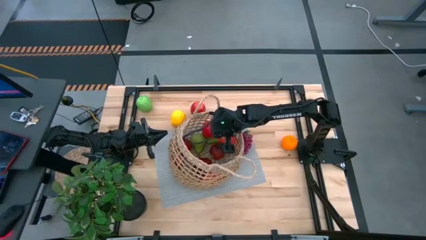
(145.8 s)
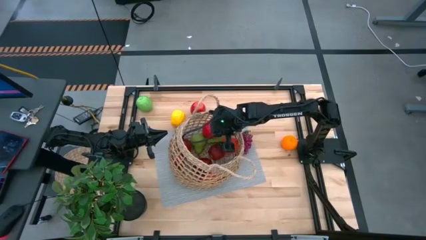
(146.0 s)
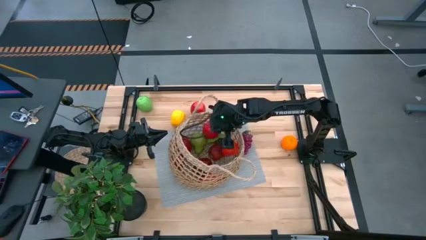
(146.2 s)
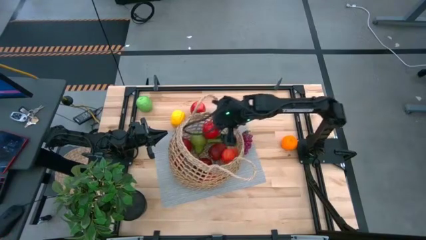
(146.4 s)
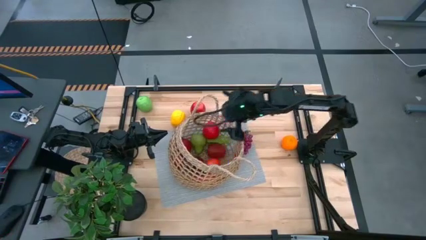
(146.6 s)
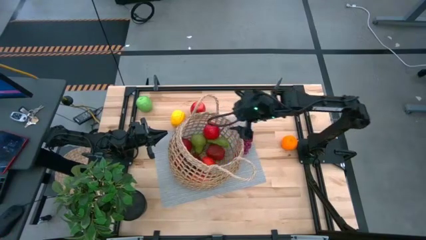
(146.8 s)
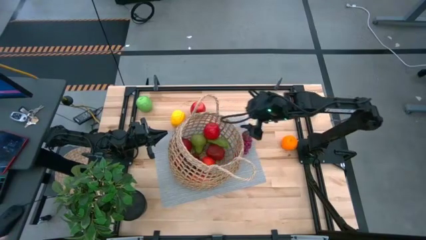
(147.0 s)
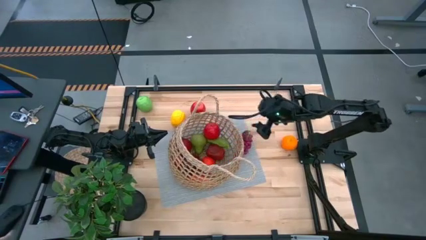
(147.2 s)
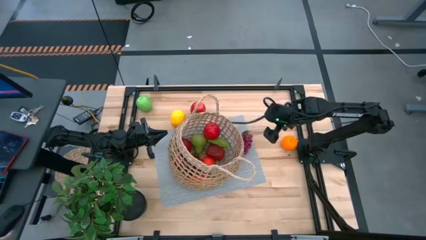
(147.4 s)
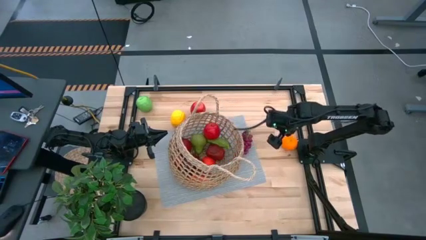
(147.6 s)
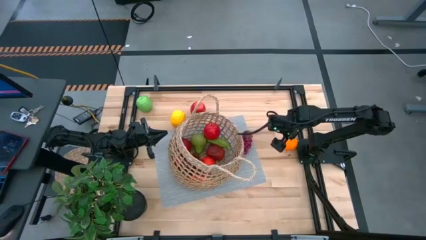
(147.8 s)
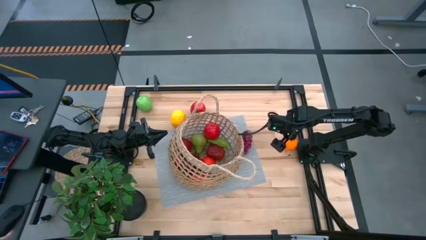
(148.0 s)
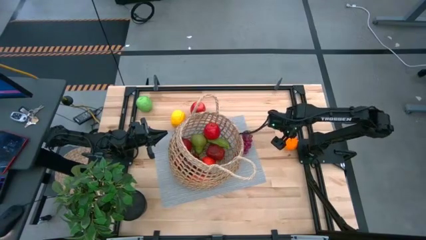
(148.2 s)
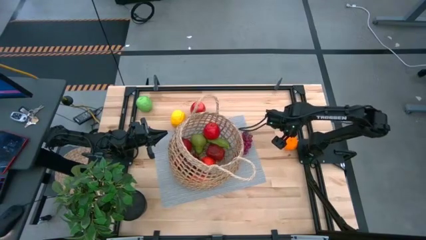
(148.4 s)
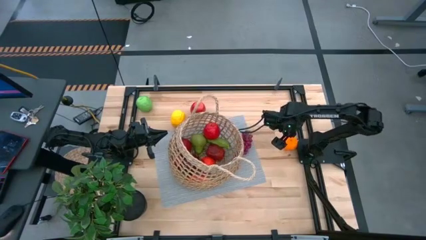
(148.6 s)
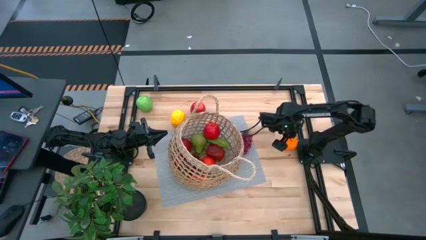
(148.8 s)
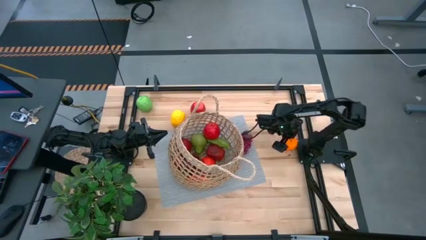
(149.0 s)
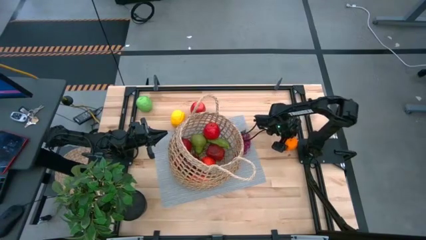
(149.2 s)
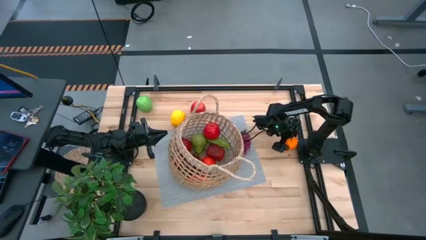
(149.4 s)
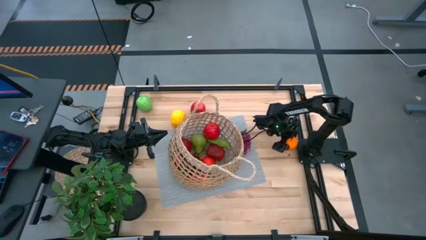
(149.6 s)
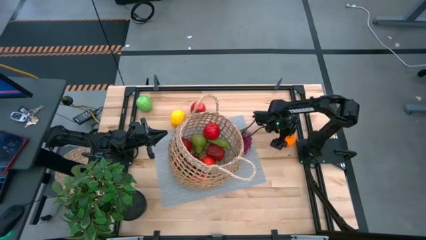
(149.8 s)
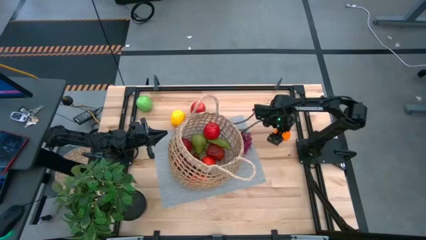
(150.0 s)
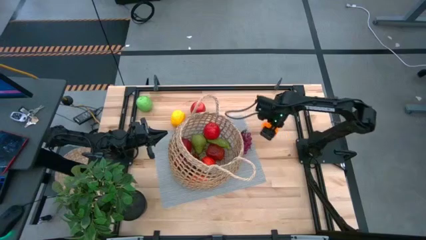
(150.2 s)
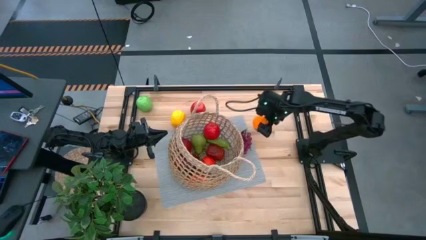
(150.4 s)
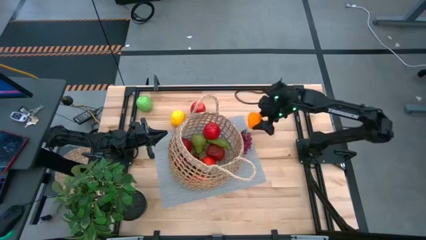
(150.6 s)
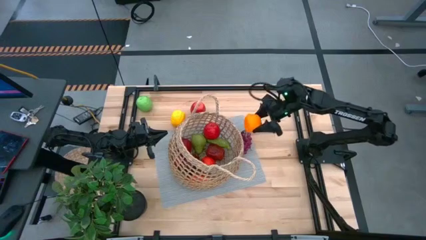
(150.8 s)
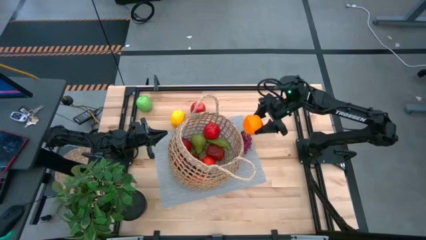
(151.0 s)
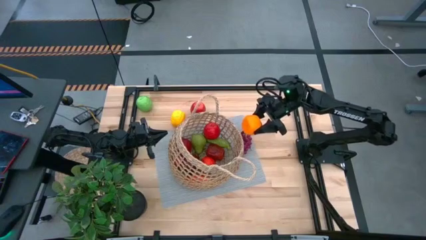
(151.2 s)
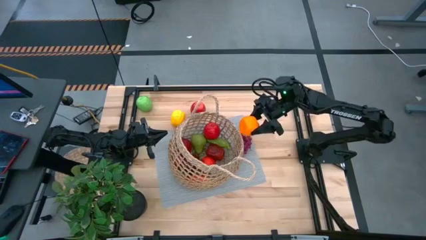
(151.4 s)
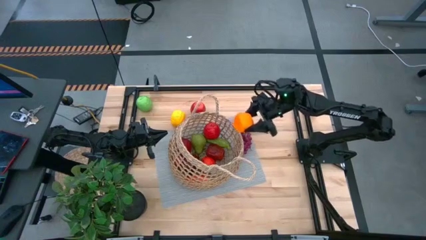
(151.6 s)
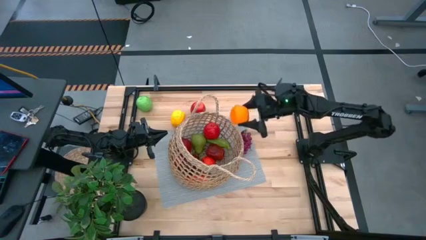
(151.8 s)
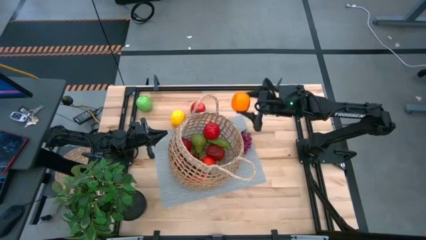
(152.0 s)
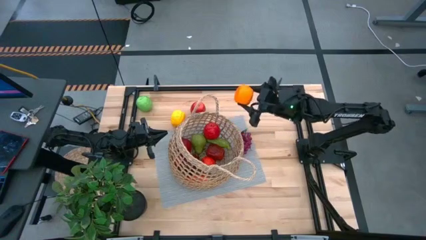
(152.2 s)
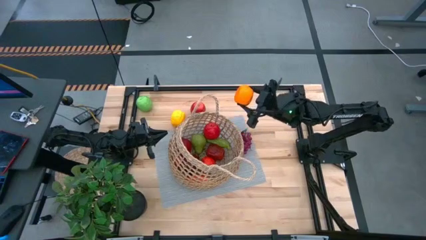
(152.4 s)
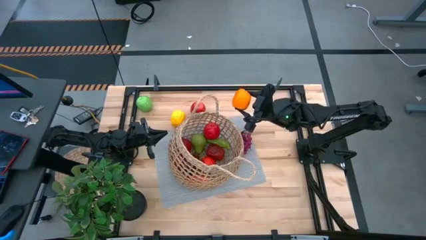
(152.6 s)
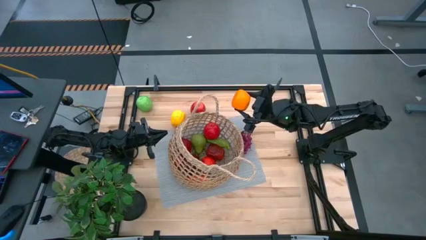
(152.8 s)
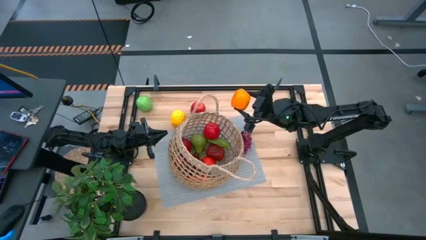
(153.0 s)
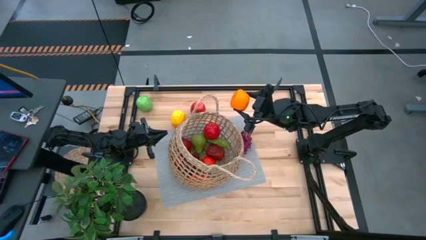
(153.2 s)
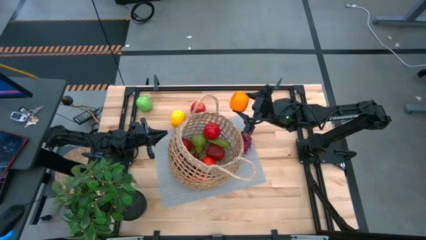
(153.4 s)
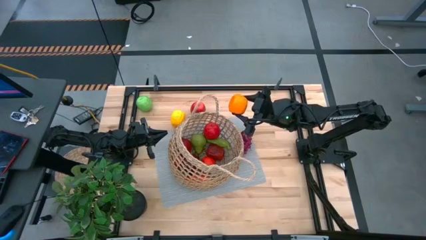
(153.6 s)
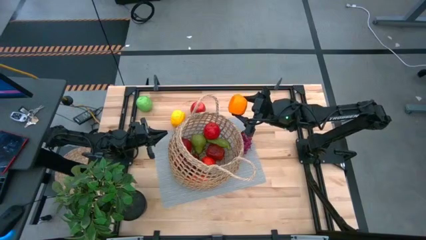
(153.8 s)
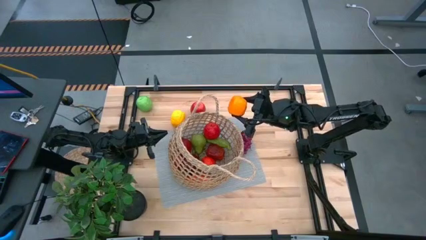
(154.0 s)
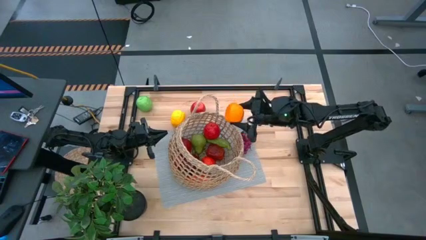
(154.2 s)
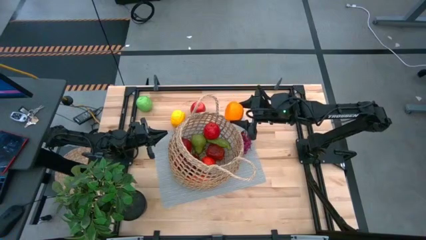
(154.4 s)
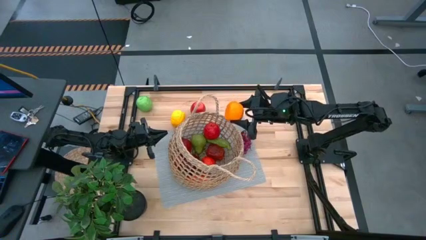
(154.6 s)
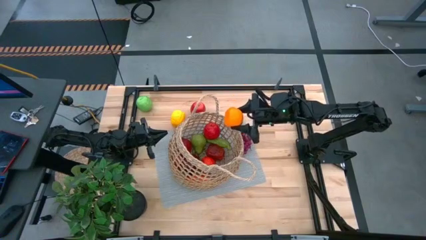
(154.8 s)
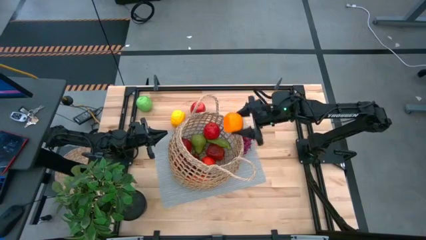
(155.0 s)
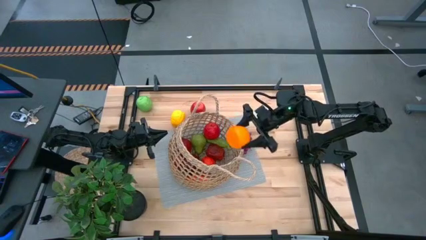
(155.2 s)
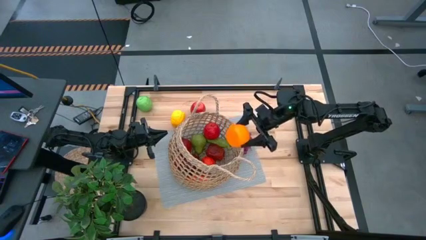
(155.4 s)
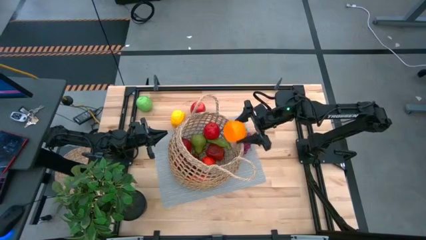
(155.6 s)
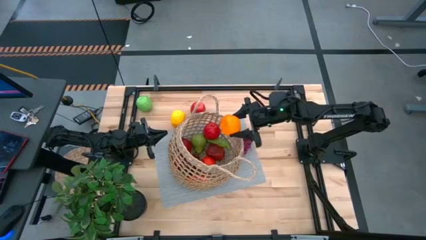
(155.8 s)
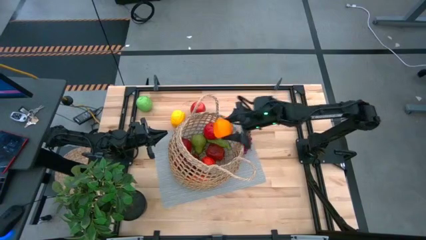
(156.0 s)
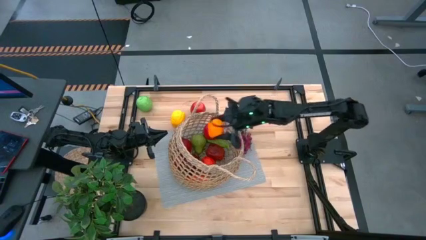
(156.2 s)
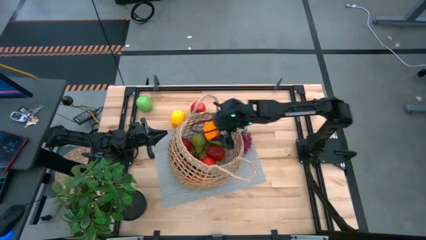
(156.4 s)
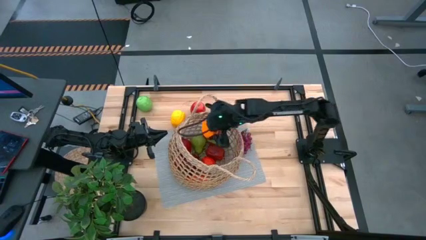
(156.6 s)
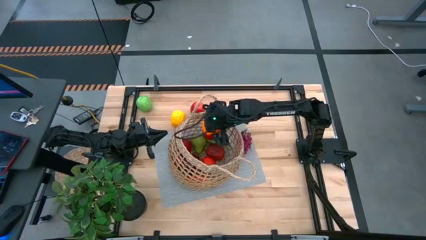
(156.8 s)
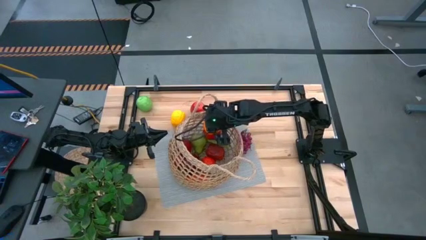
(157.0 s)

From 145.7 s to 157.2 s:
Task: Build produce basket
Put the orange into the basket

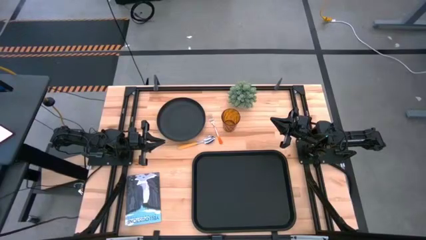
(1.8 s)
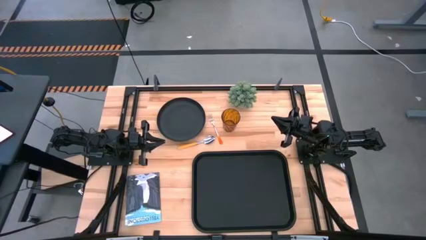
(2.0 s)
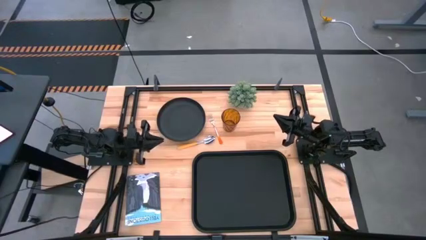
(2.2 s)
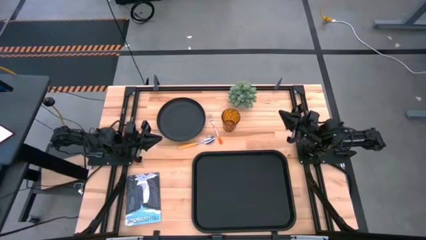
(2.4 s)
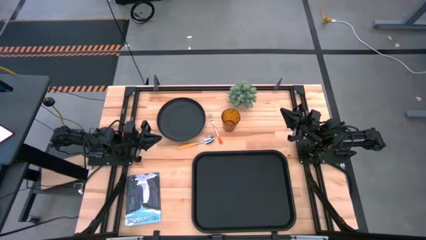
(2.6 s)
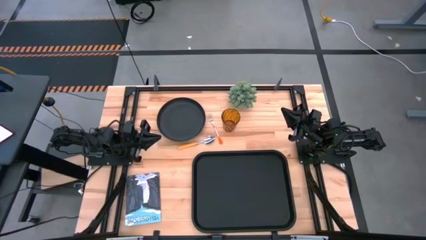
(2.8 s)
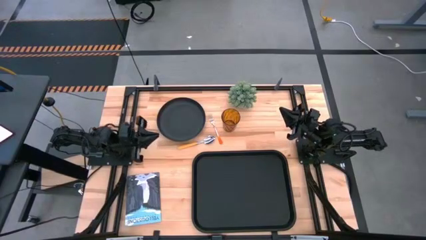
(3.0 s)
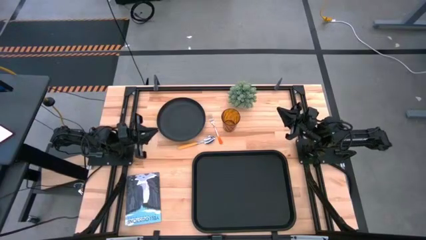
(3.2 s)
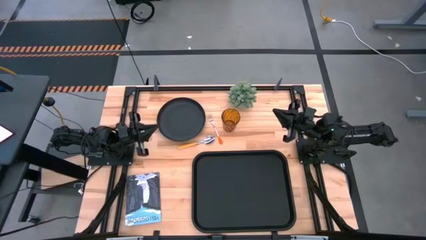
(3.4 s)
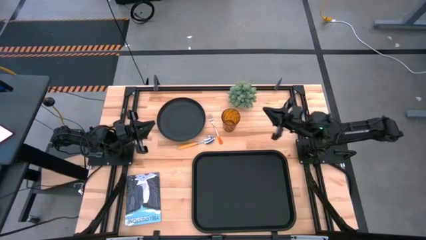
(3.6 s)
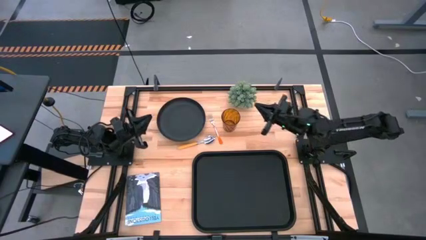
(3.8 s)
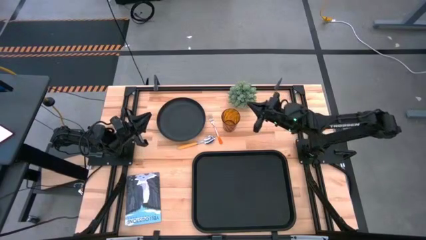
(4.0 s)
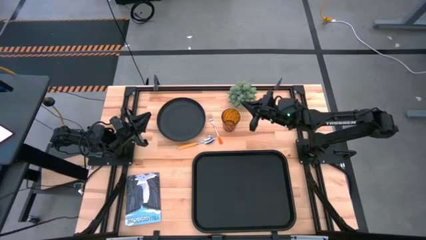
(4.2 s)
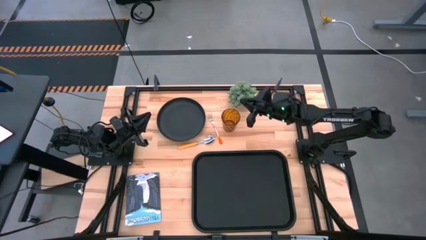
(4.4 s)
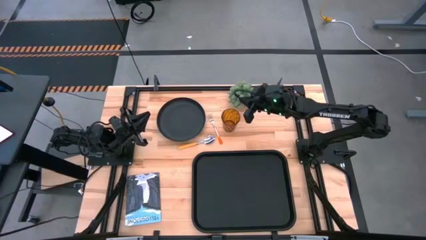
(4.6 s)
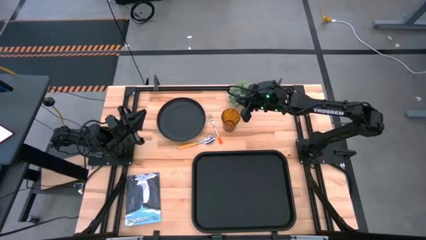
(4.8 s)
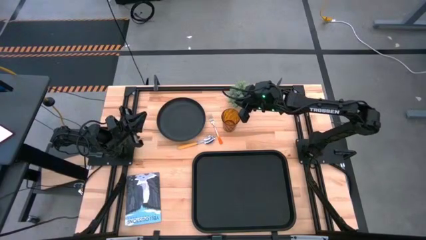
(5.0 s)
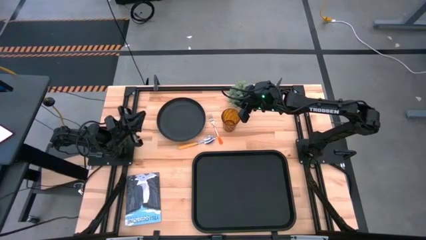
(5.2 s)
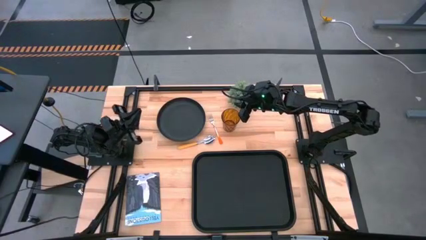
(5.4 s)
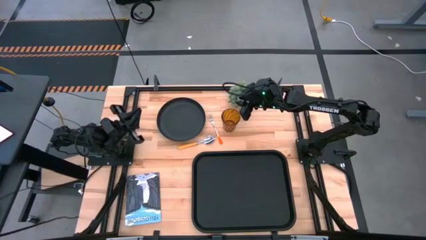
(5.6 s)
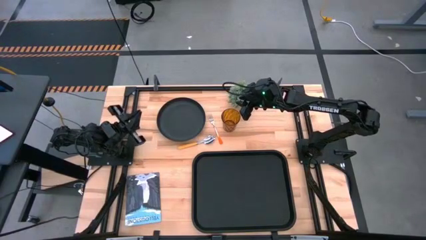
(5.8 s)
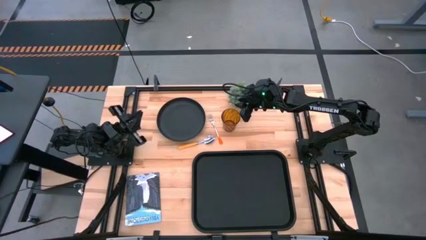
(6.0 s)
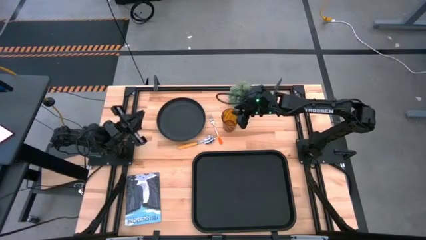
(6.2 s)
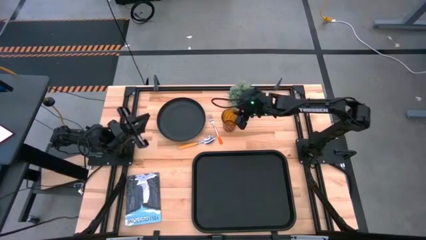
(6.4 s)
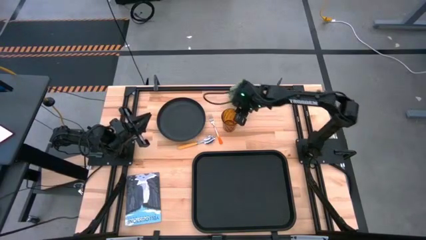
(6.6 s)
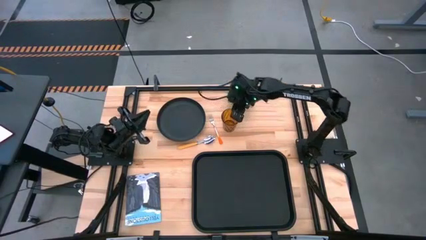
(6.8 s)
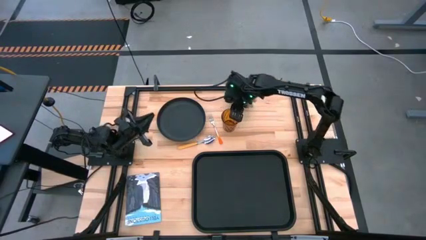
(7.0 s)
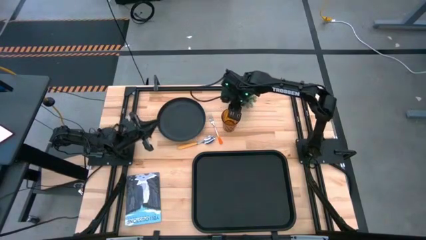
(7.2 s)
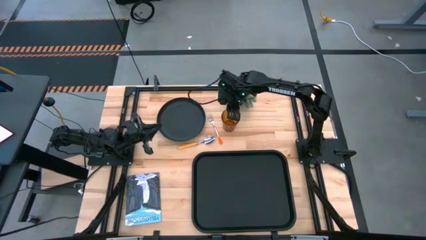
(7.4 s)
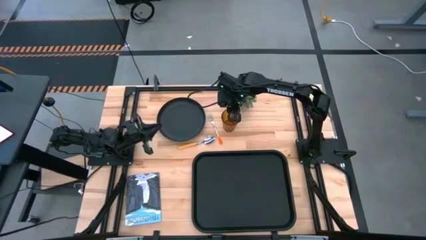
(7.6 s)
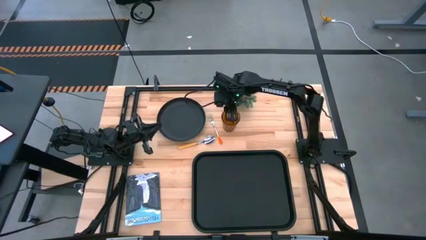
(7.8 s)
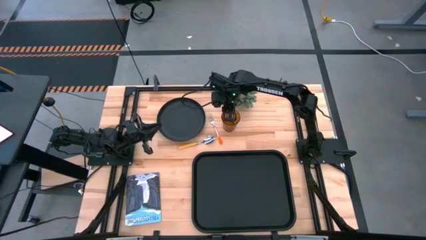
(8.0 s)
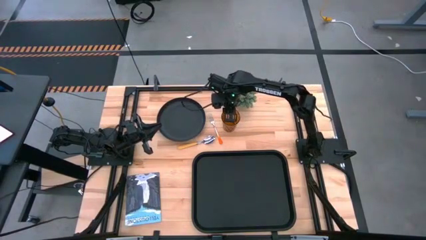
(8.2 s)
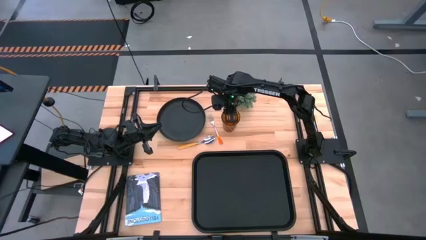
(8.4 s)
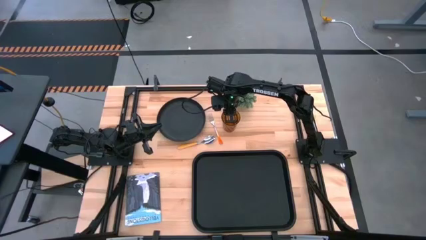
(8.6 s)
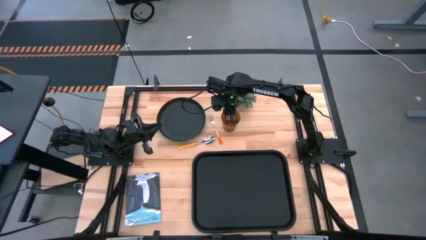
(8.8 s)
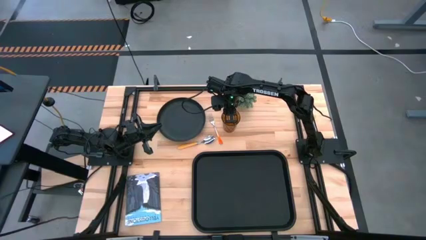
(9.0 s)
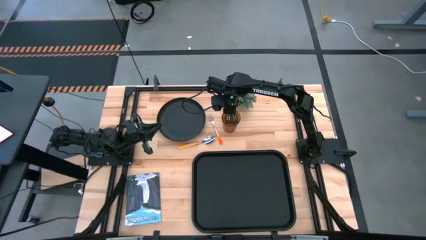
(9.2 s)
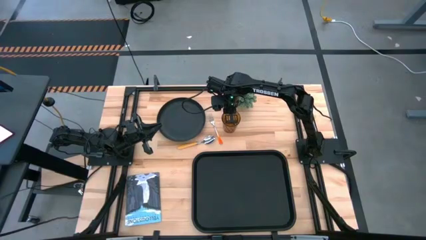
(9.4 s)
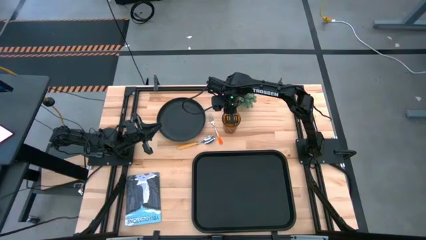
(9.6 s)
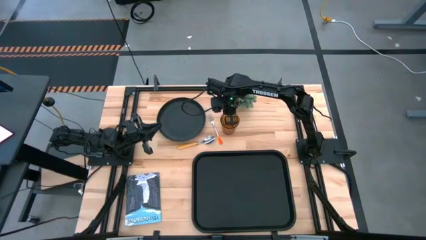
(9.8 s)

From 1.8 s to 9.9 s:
Task: Pick and place plate/cup/fork/spoon on tray
Put the orange glass on the top right of the black tray
